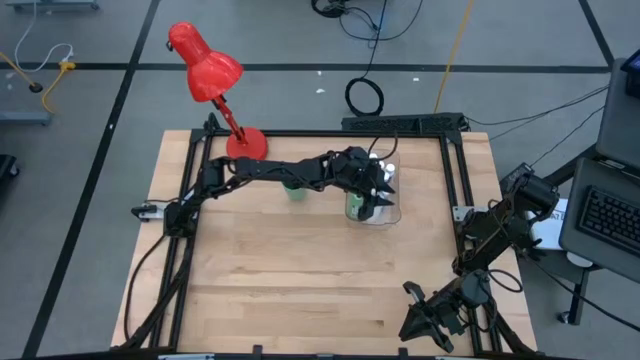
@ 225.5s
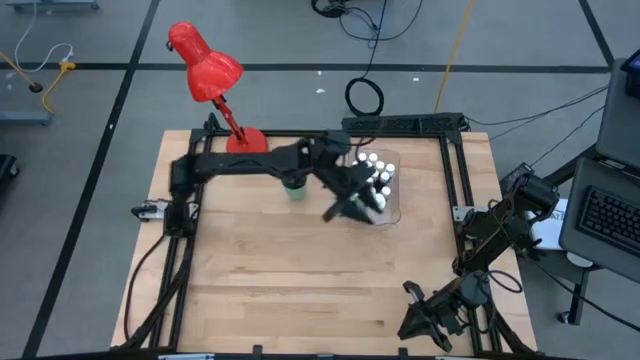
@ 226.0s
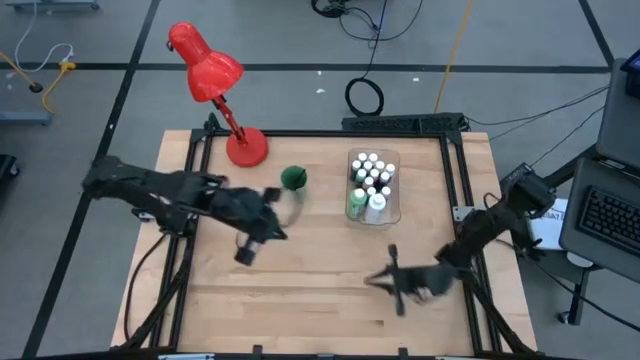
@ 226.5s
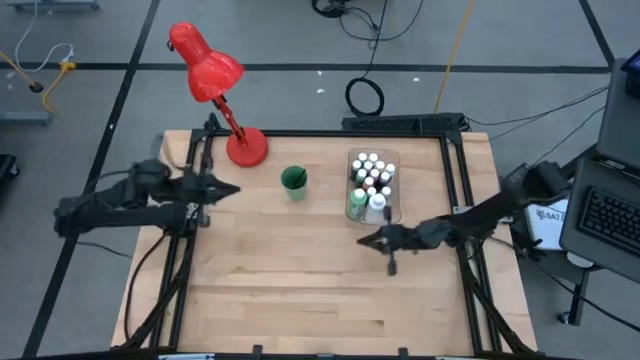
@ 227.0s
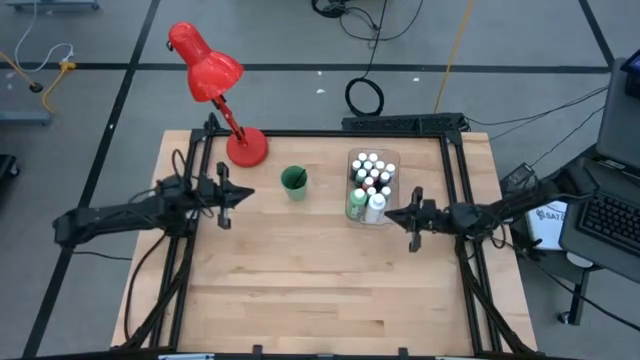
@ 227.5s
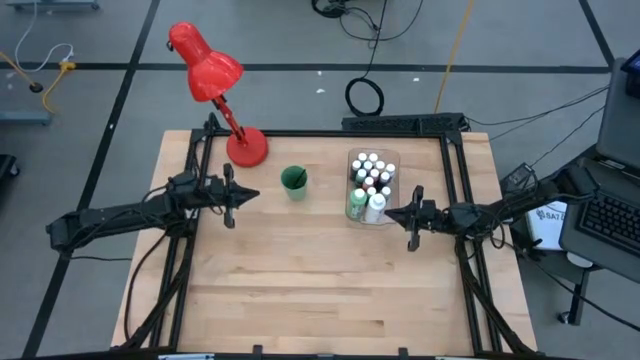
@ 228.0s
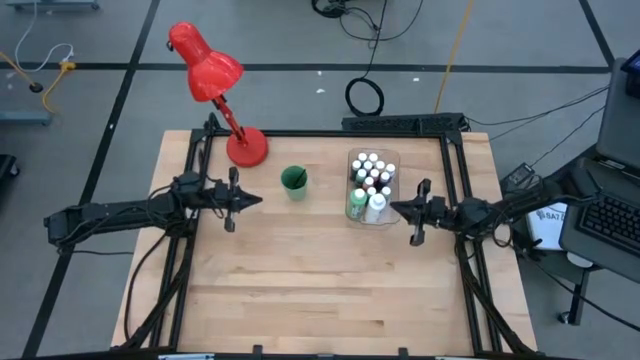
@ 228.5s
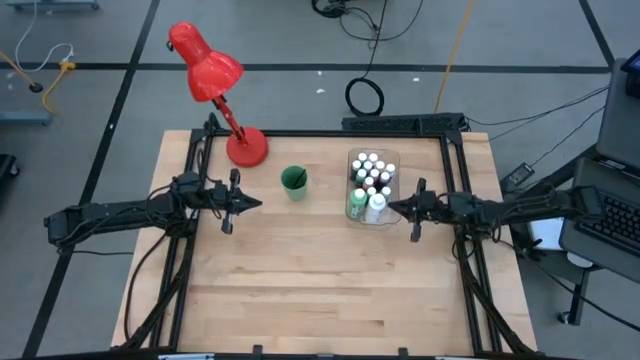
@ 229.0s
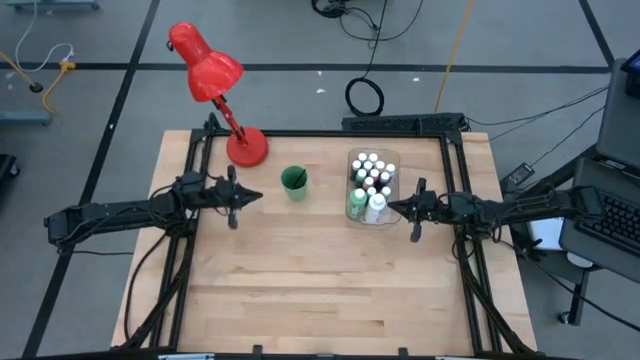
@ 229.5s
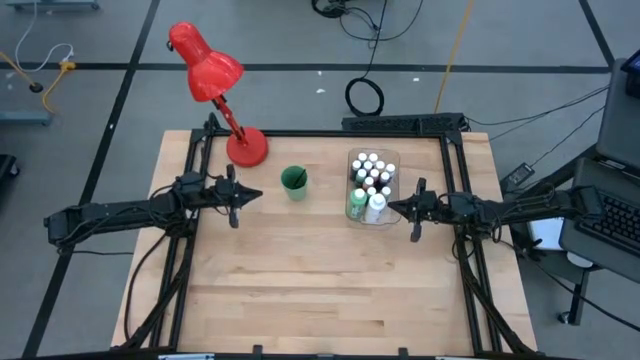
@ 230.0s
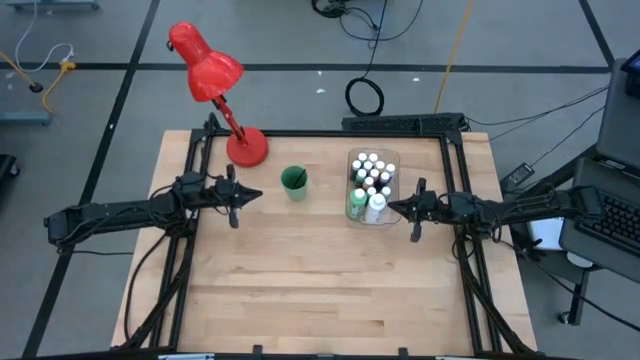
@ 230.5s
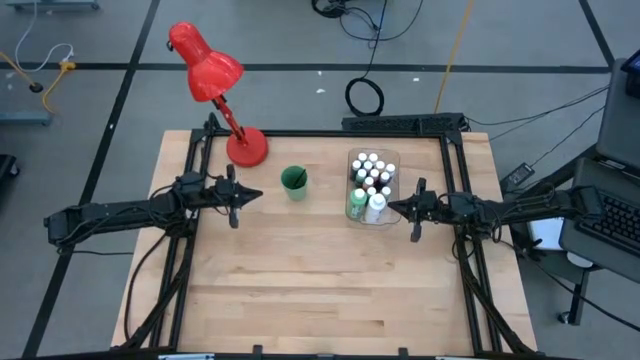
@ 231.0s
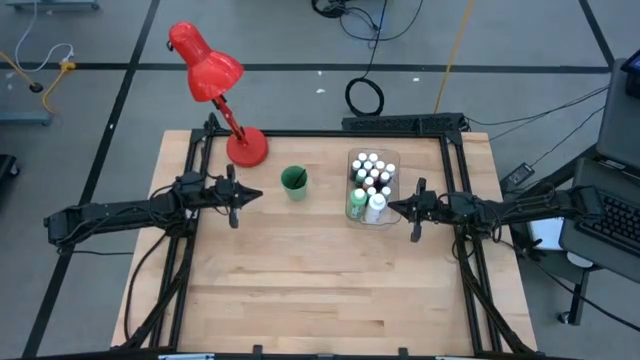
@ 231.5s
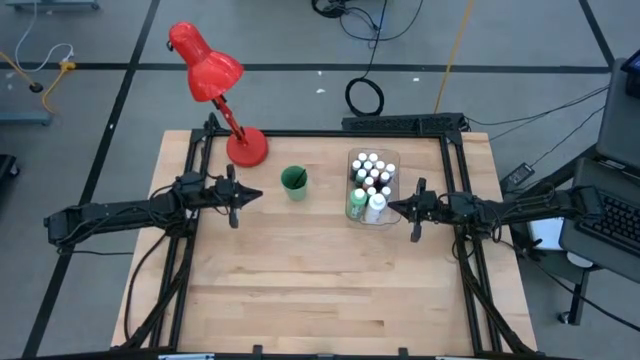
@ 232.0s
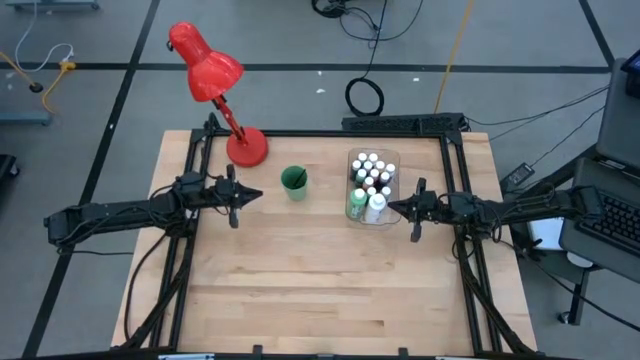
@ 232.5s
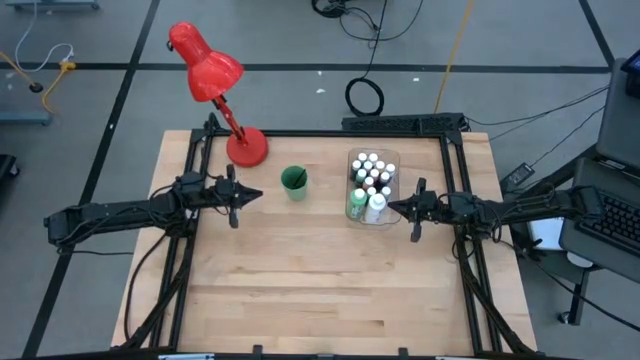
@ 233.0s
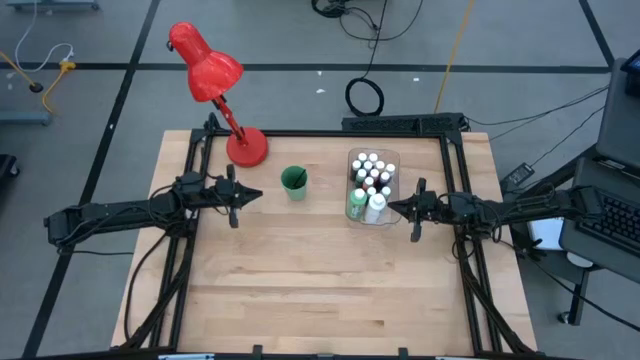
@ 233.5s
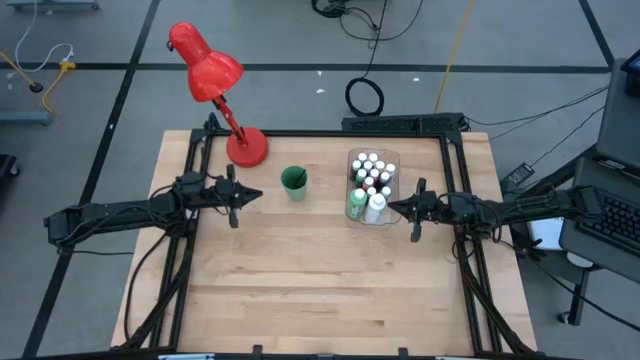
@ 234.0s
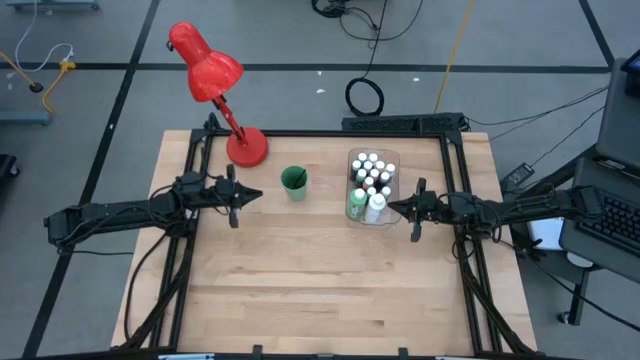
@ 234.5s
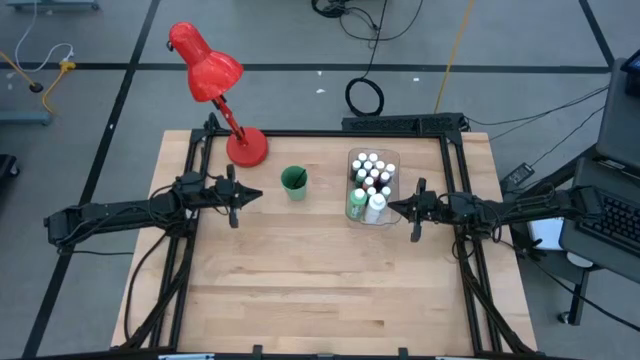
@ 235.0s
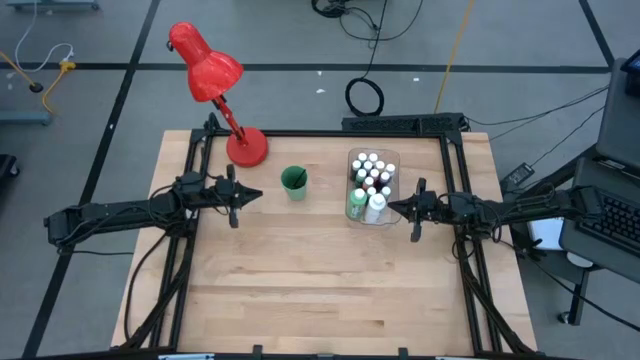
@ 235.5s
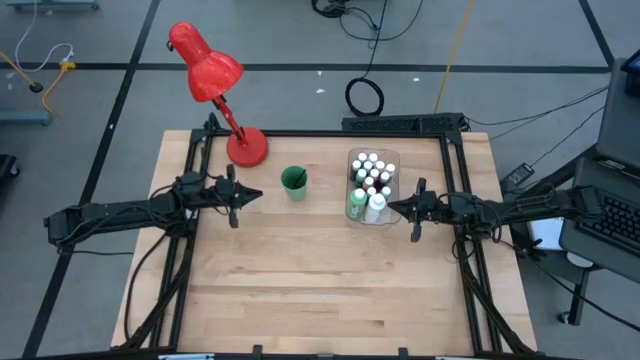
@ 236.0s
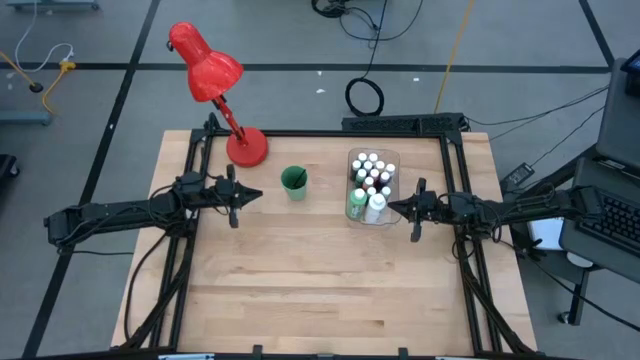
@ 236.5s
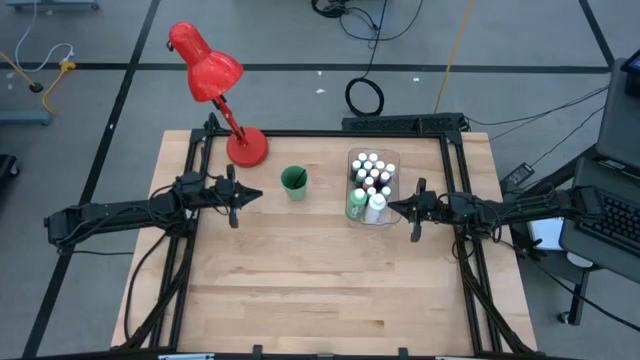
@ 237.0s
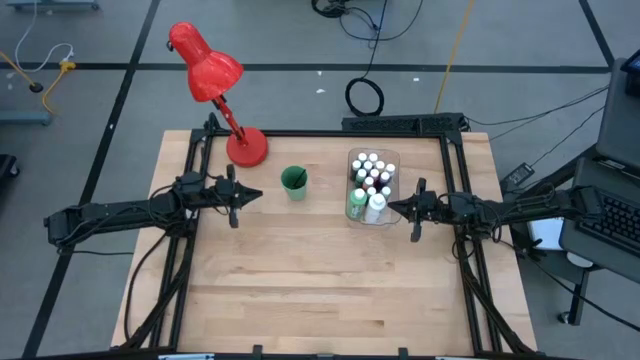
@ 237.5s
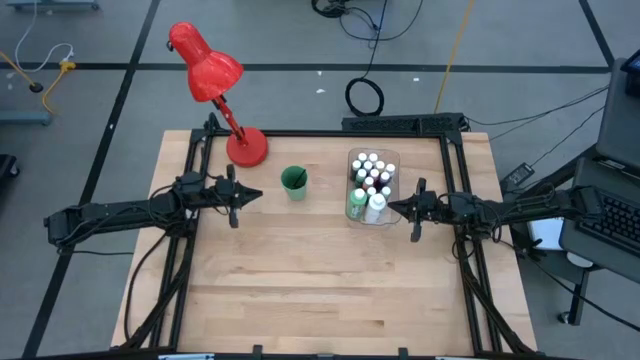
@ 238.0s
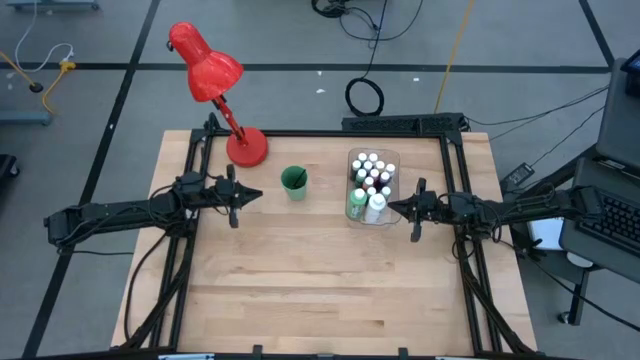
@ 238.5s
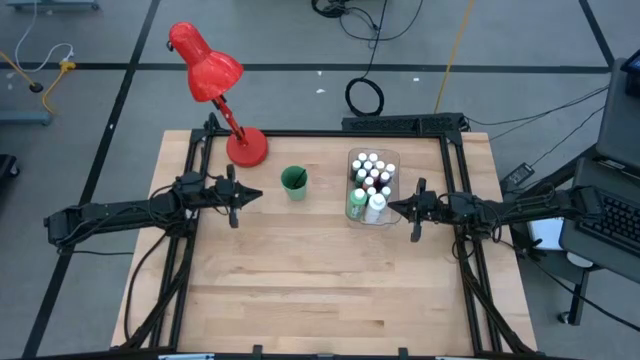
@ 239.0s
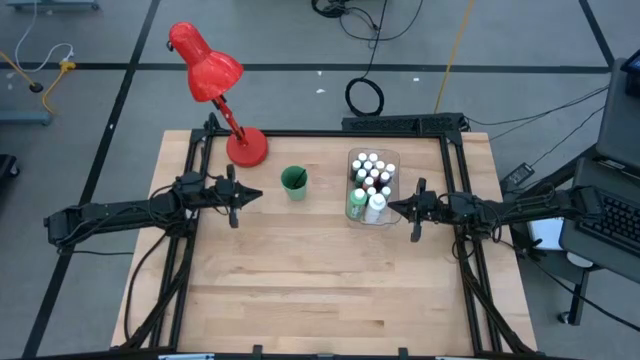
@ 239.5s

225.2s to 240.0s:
Task: Pick & Place Paint Supplies
Return to Home Position

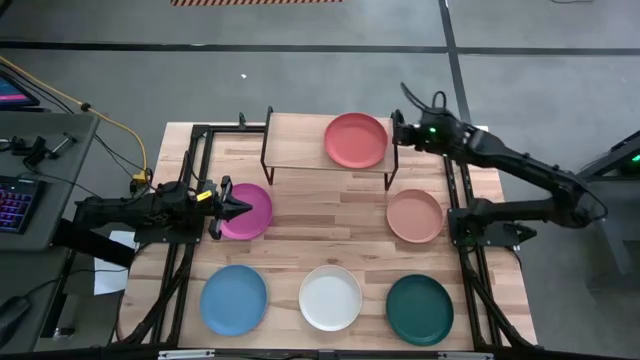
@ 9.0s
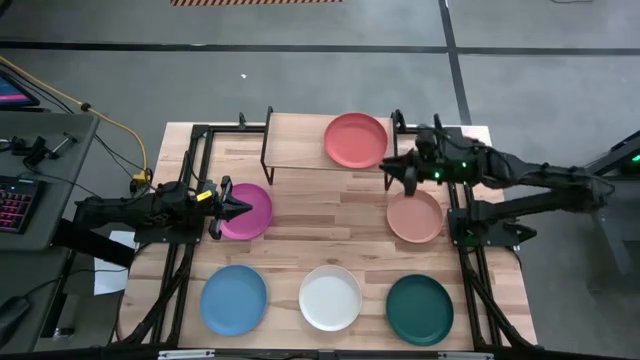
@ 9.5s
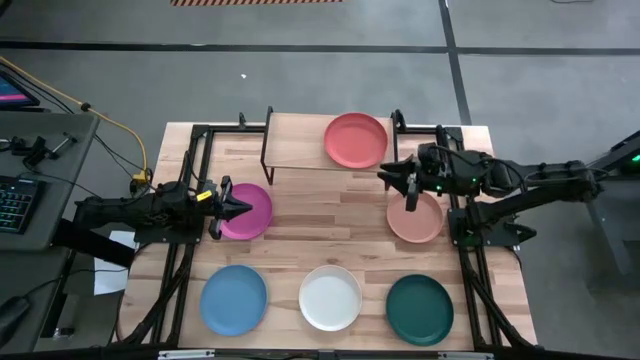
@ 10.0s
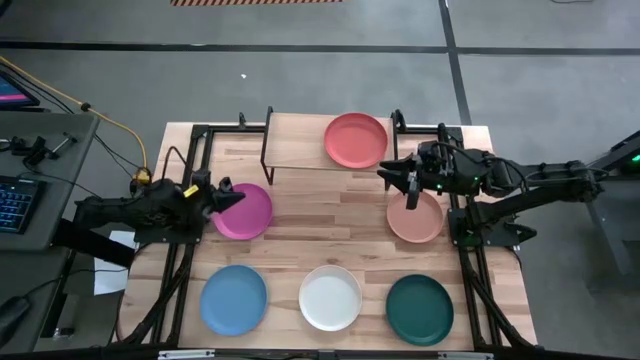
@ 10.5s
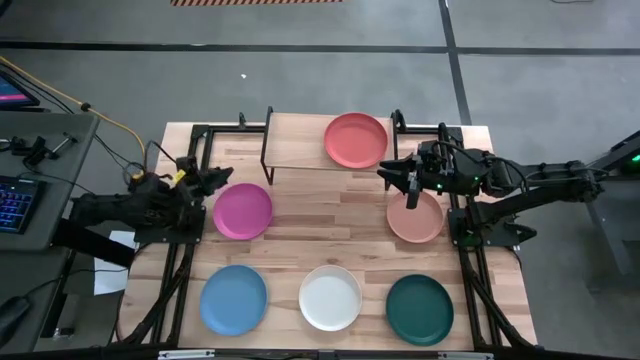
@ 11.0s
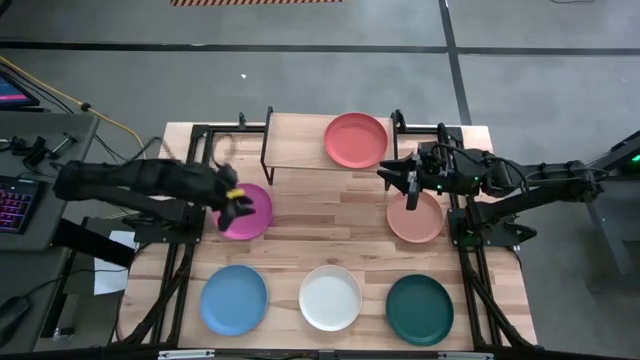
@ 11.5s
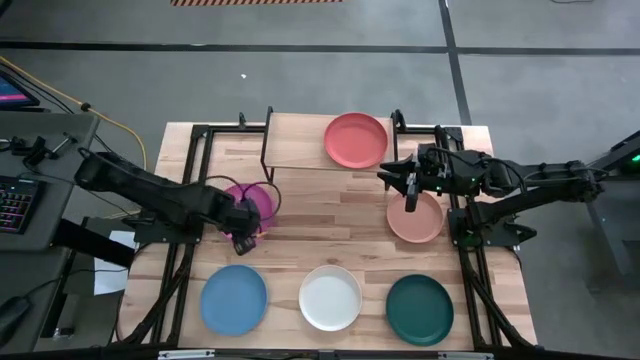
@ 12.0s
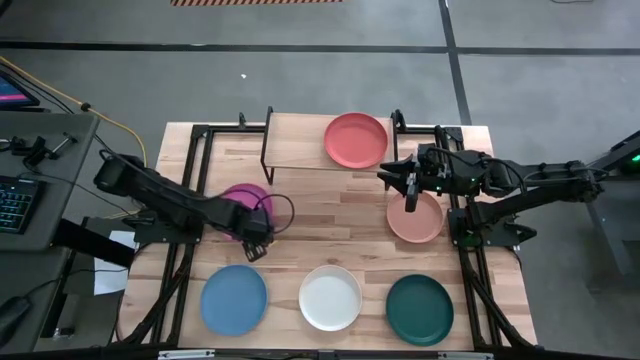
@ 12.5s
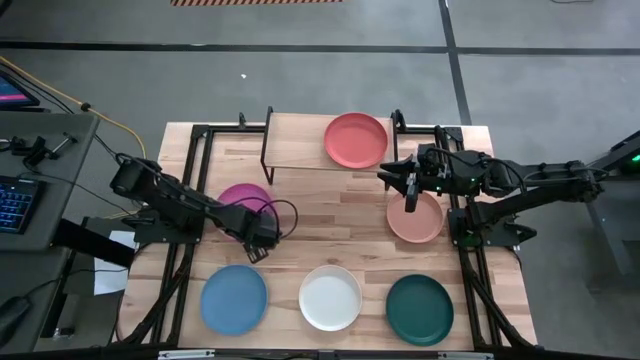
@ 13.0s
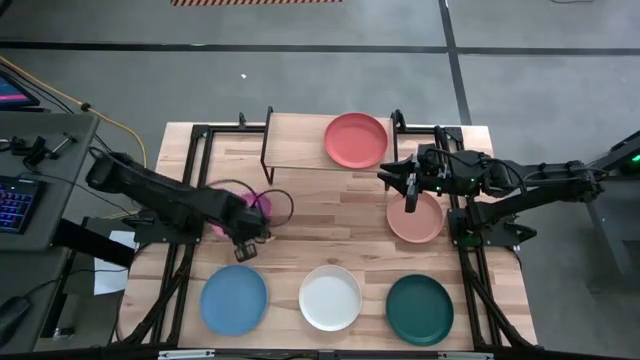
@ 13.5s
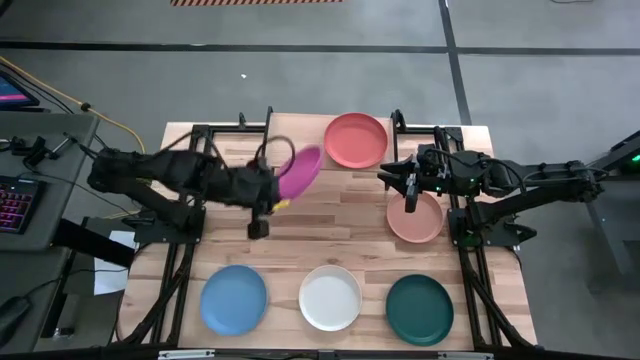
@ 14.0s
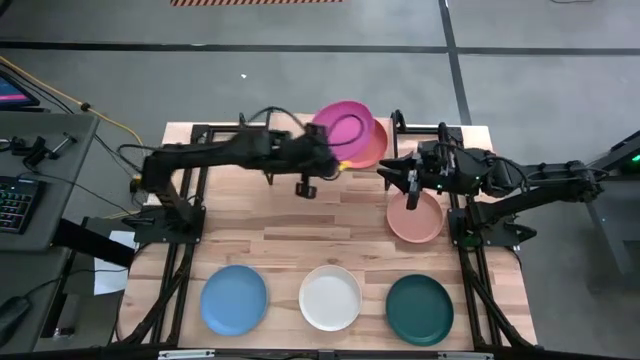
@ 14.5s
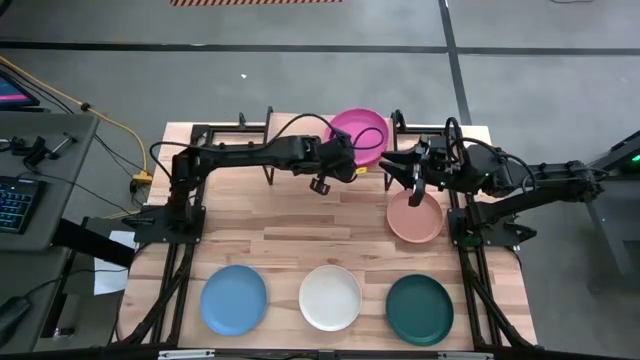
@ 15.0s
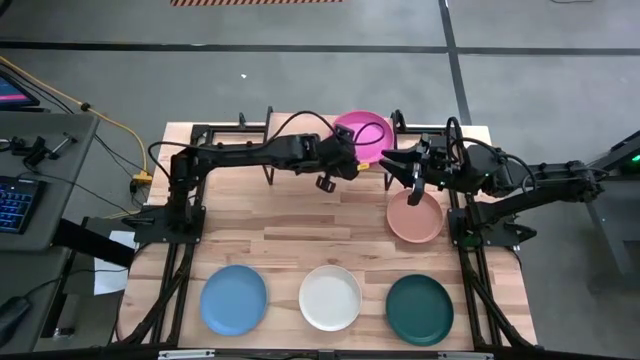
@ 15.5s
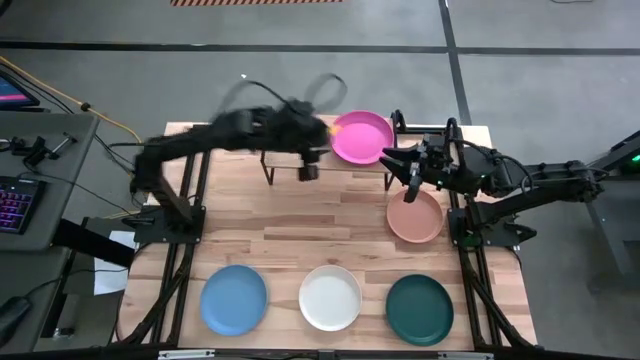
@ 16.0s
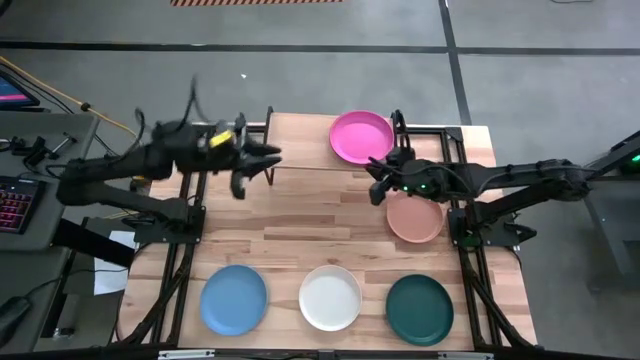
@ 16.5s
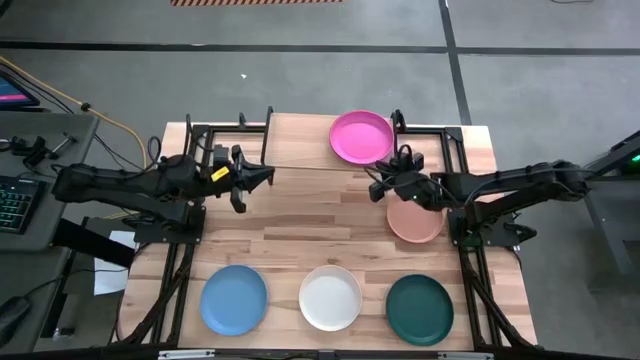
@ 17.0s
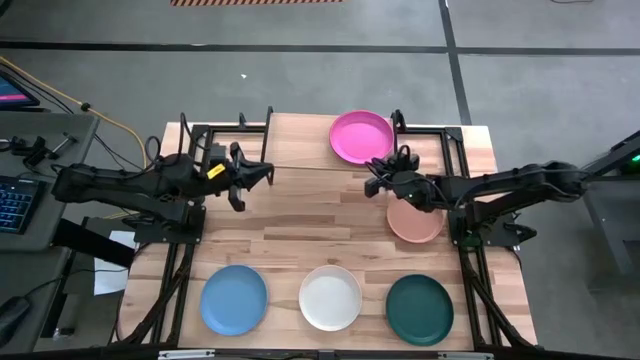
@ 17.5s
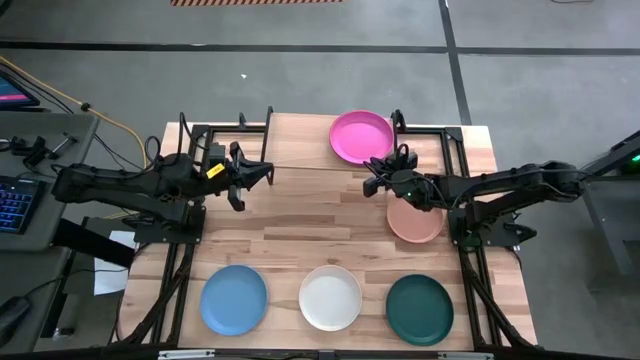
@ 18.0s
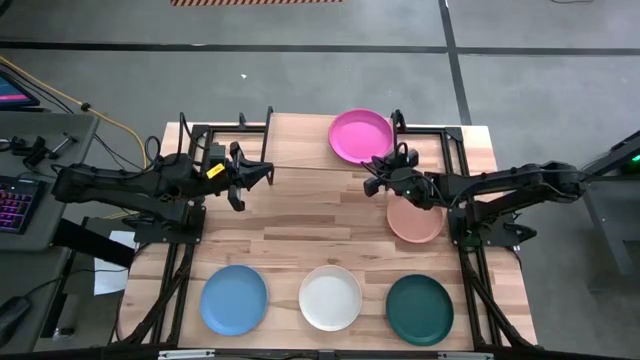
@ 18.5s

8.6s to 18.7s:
Task: Place and stack plates onto a shelf
Stack the pink plate on the orange plate
